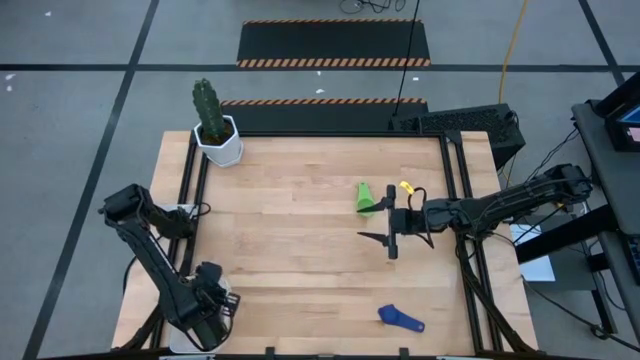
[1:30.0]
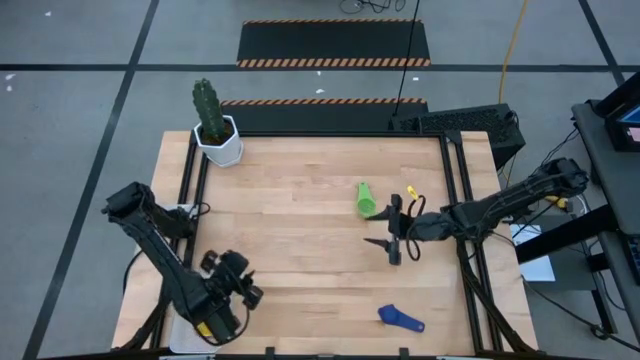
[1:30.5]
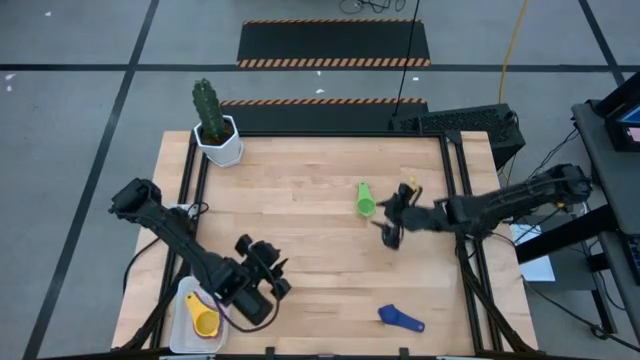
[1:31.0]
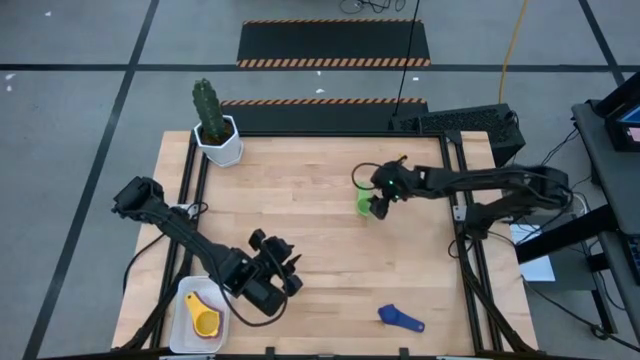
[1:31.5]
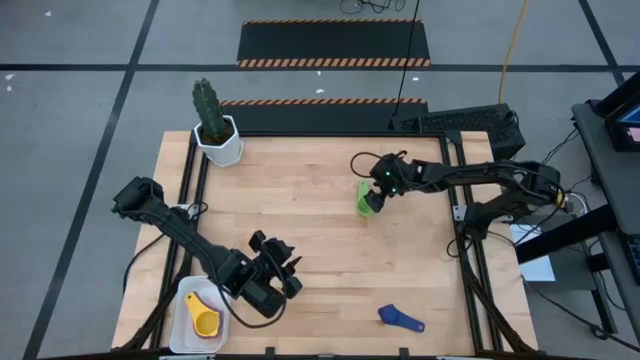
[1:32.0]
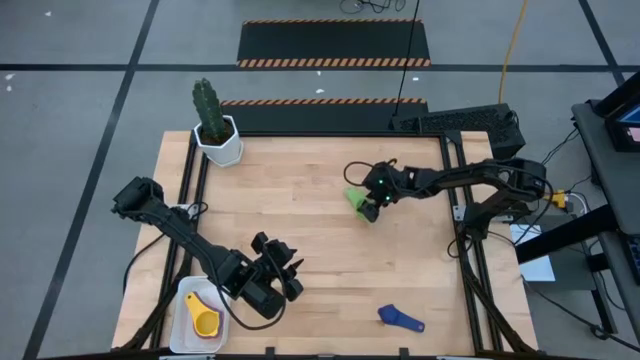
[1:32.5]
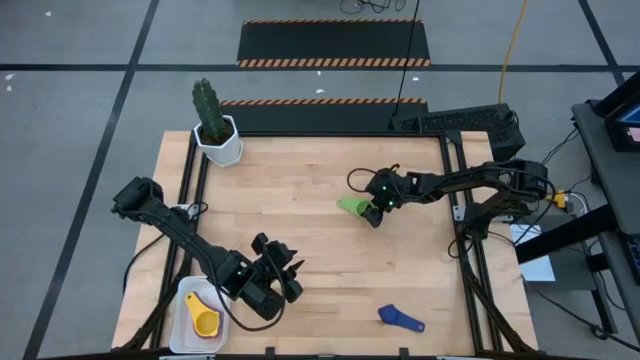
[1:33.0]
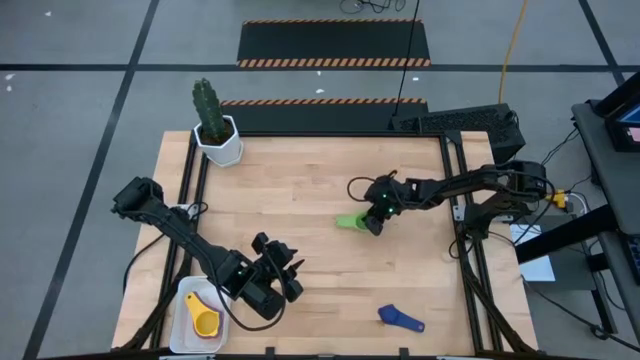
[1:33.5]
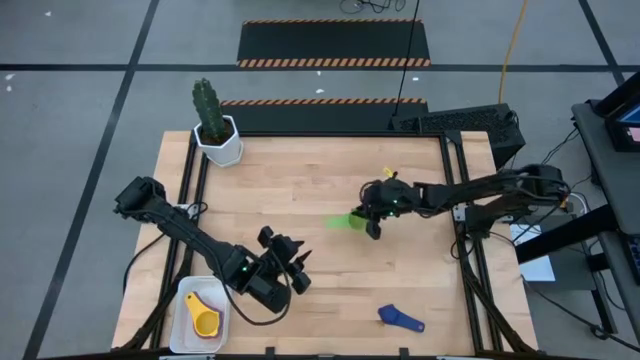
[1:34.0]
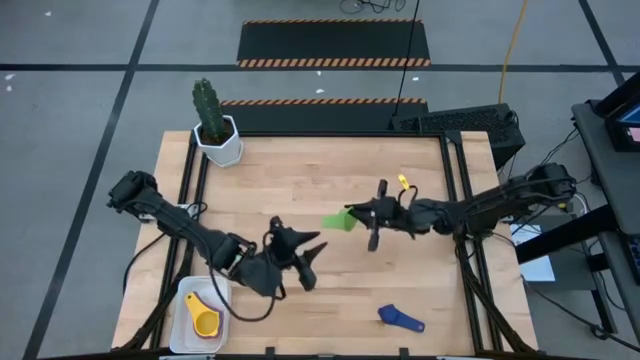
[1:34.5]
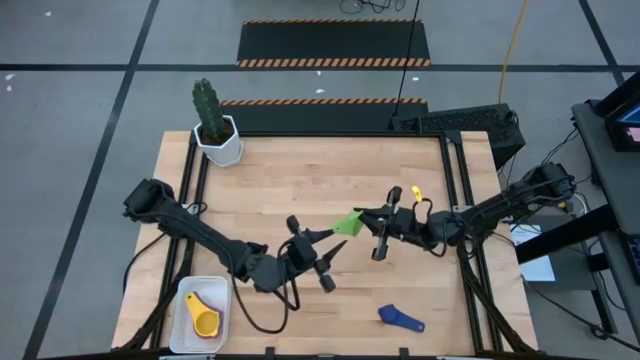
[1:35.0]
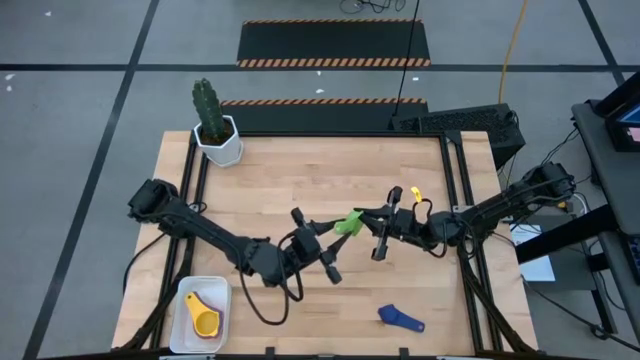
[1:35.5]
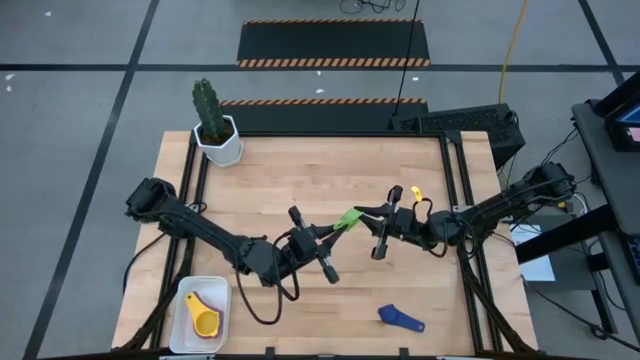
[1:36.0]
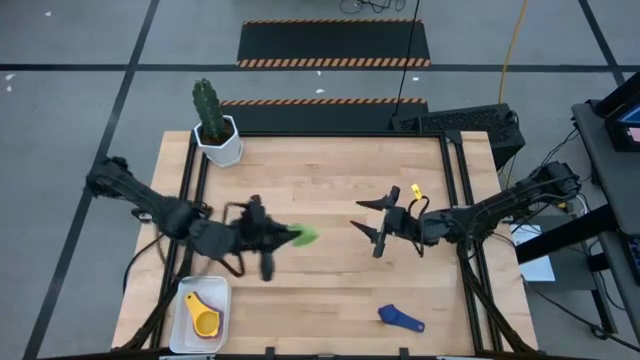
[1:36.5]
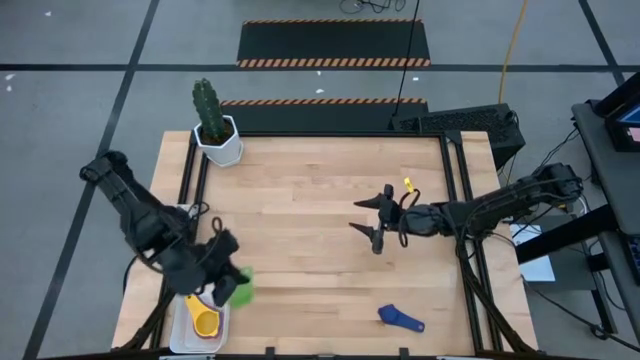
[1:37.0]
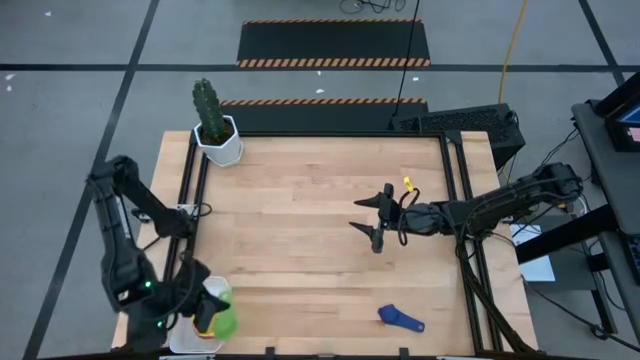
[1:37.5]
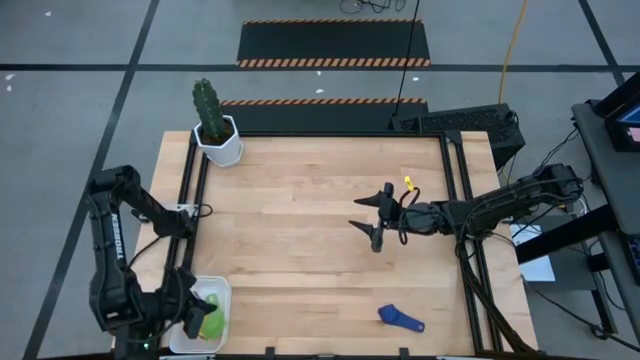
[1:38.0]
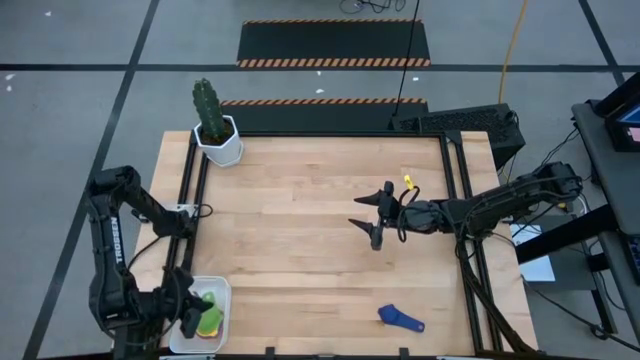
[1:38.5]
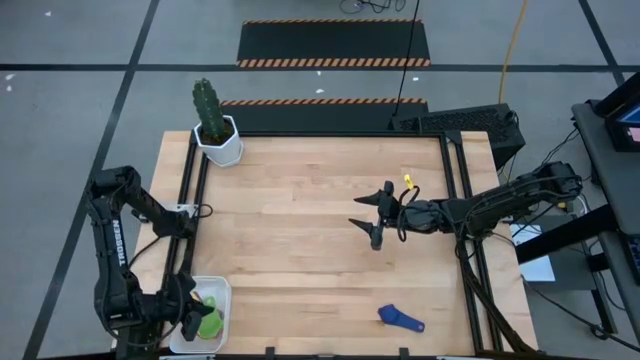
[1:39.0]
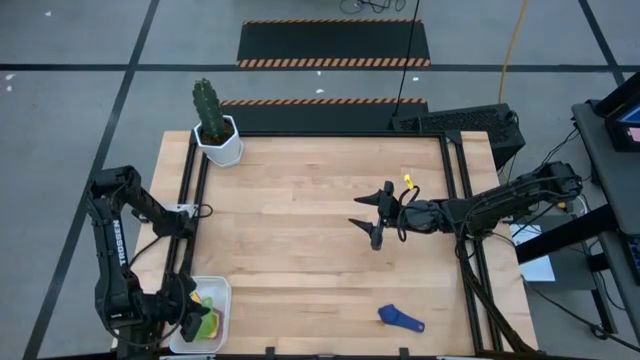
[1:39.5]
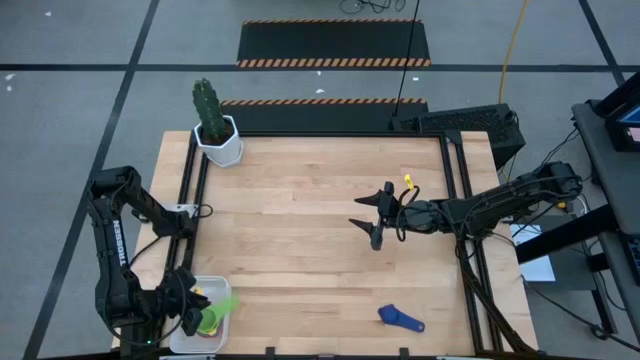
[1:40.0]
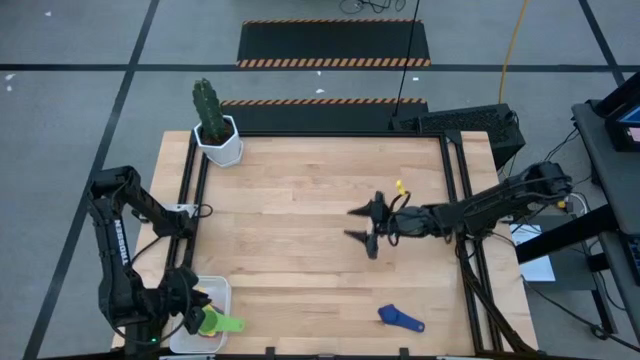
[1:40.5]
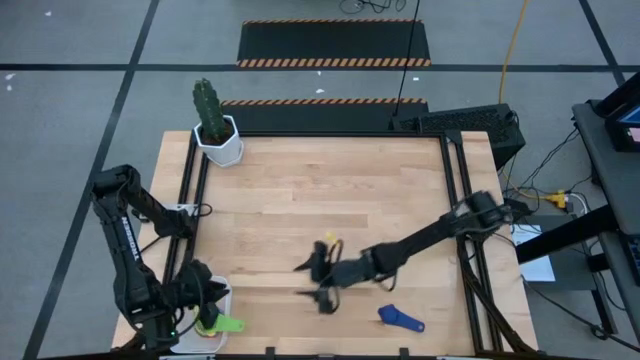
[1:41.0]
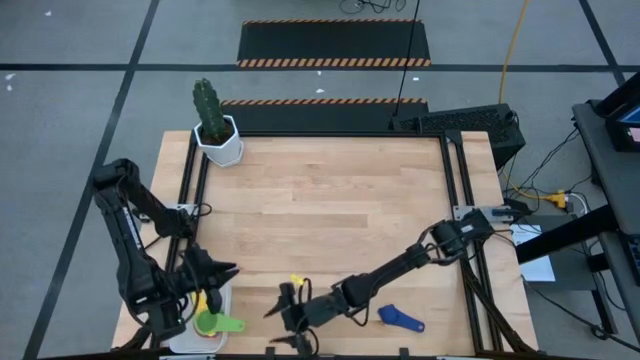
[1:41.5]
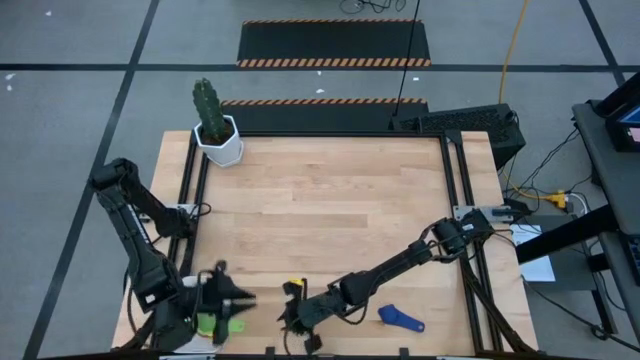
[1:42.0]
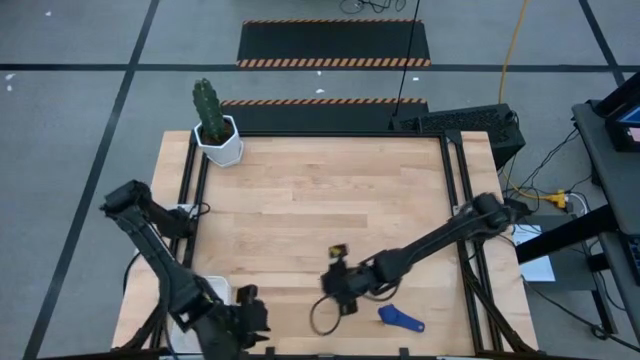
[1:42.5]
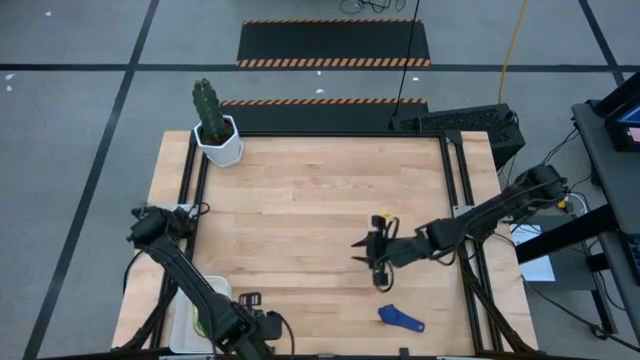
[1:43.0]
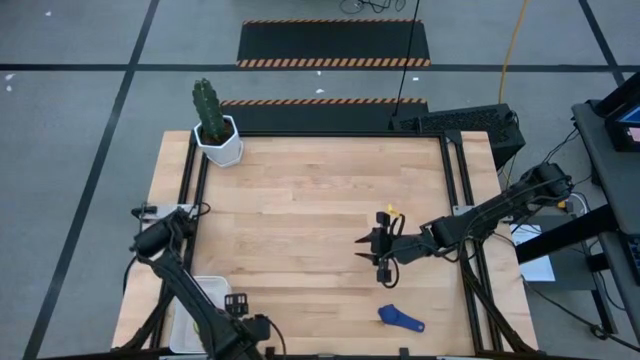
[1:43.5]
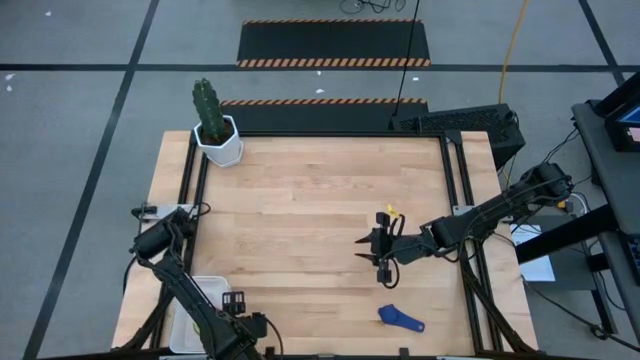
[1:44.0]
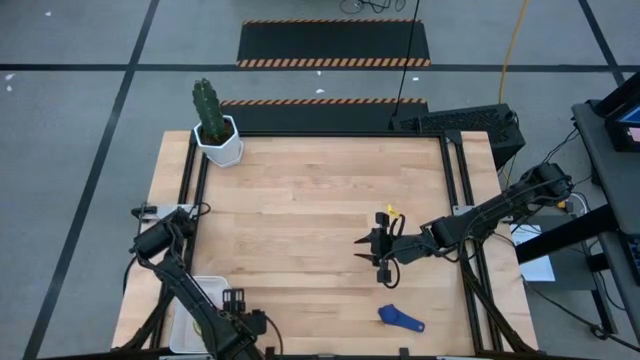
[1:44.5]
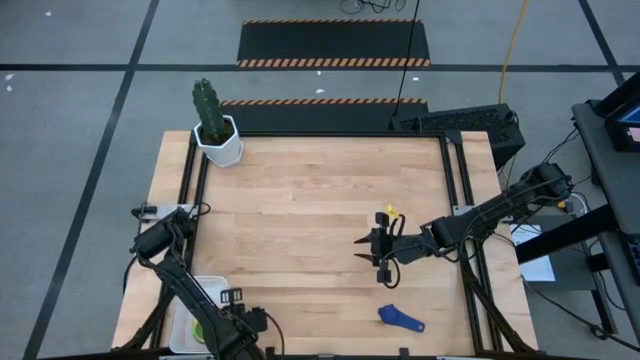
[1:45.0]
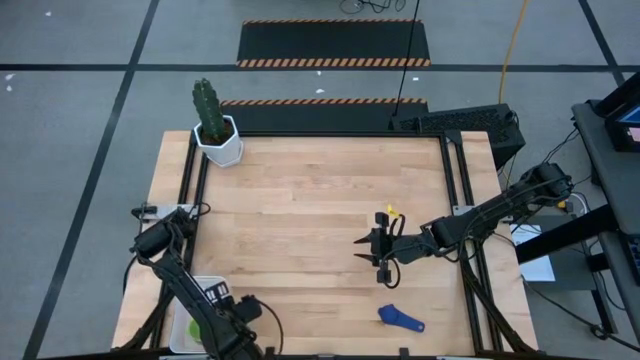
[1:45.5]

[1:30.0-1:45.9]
Task: Nest measuring cups in basket
Stack the green measuring cup on top of the yellow measuring cup into the white bin

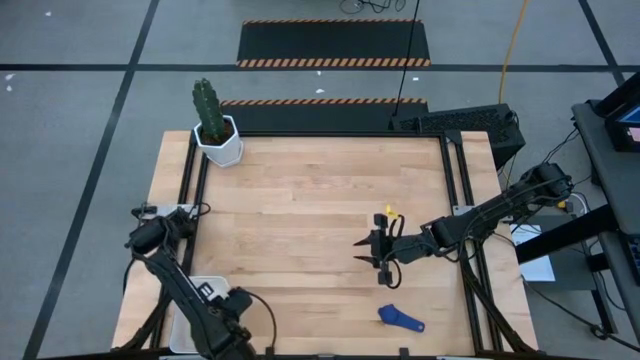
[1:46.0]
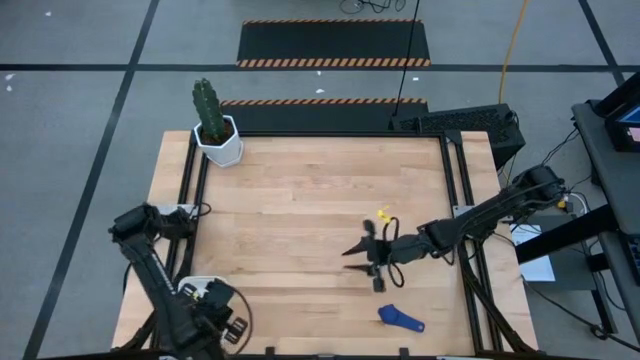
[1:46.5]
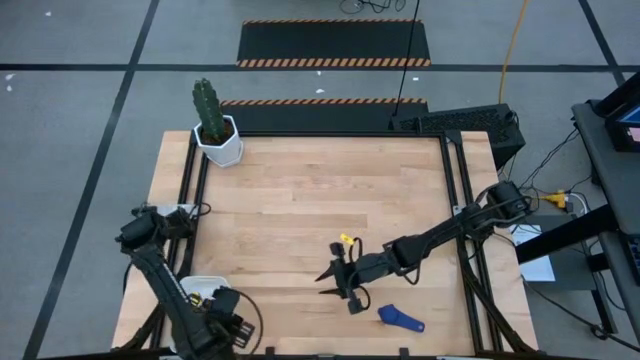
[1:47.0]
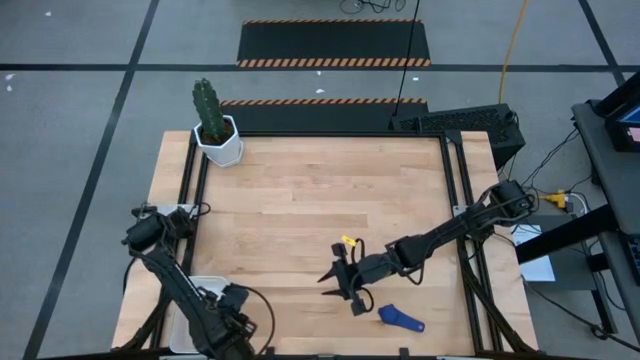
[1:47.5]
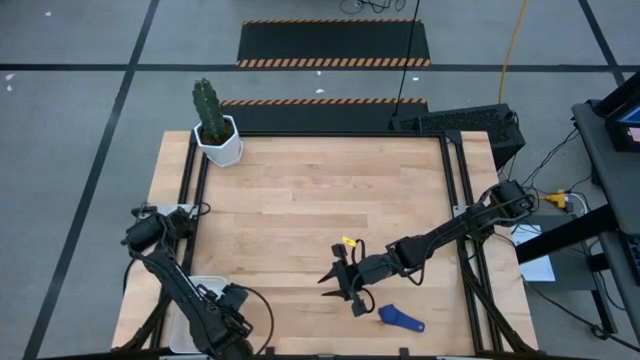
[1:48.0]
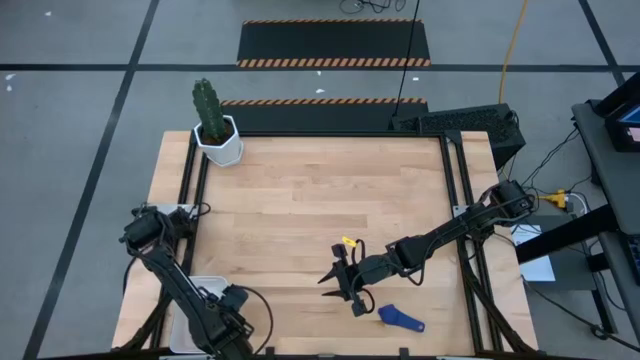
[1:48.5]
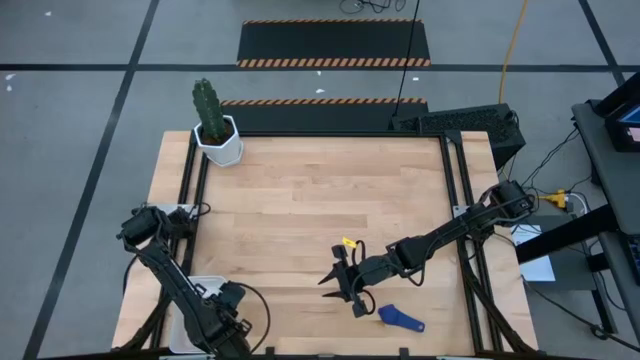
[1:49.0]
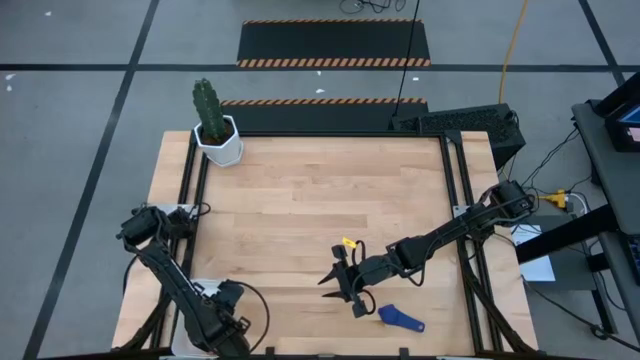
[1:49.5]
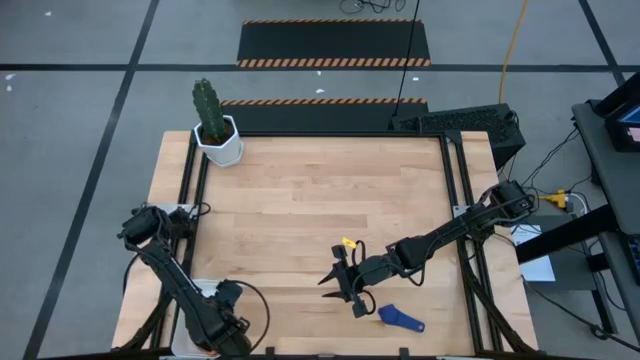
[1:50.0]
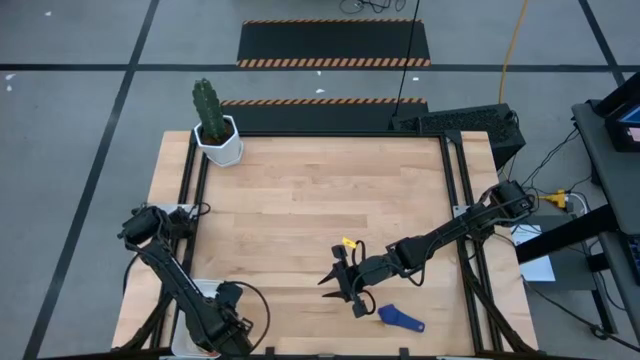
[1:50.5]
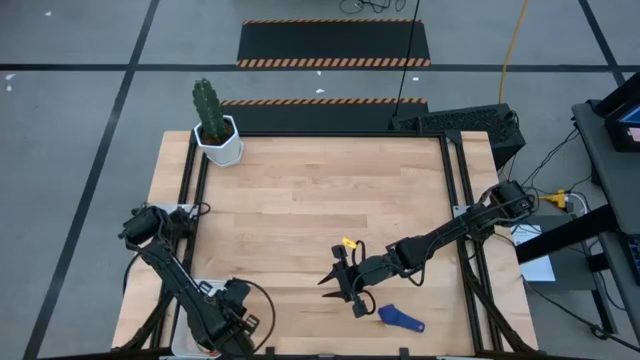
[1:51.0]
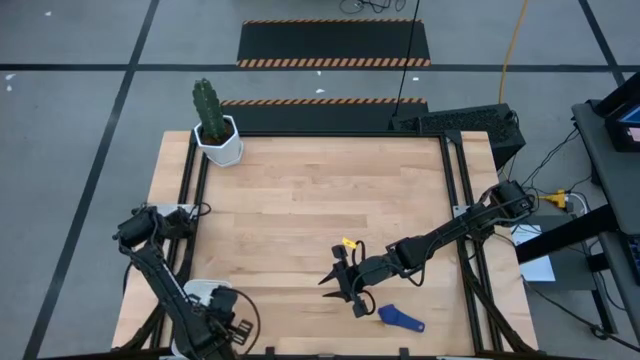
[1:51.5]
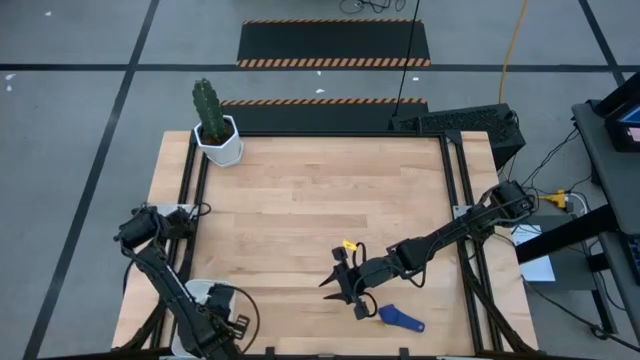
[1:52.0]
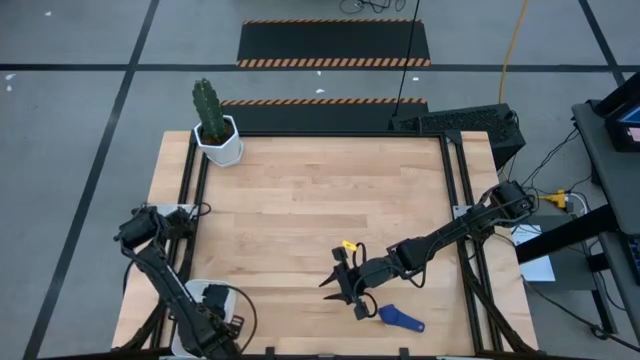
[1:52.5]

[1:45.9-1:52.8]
Stack the green measuring cup on top of the yellow measuring cup into the white bin
